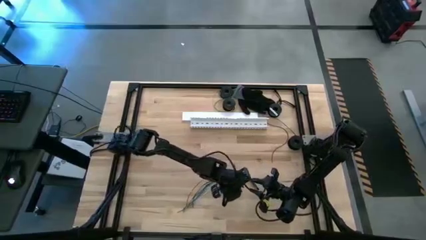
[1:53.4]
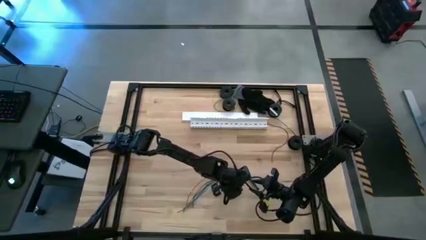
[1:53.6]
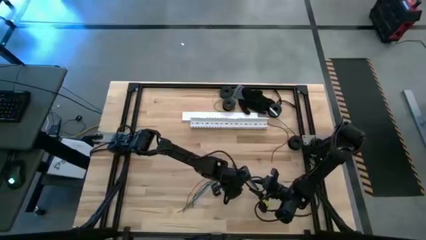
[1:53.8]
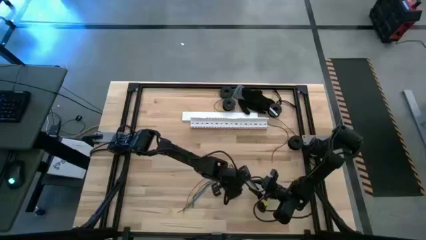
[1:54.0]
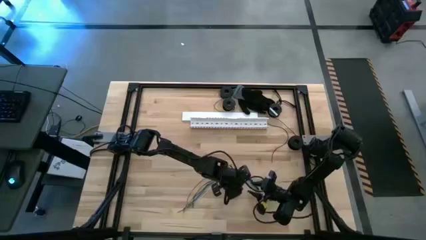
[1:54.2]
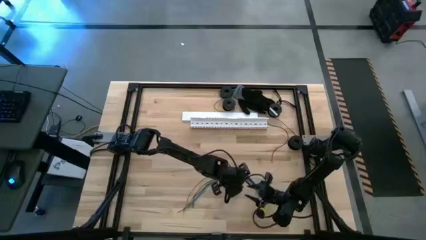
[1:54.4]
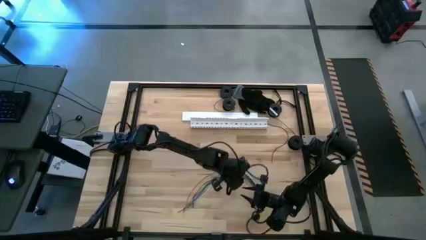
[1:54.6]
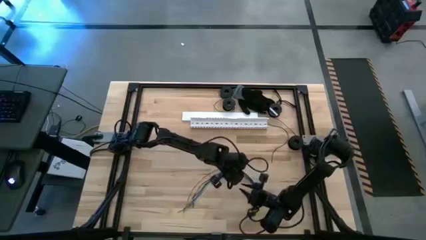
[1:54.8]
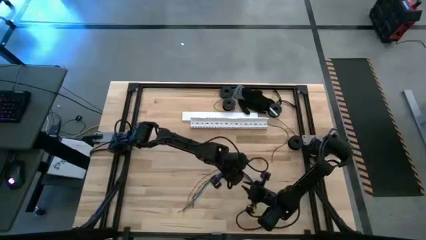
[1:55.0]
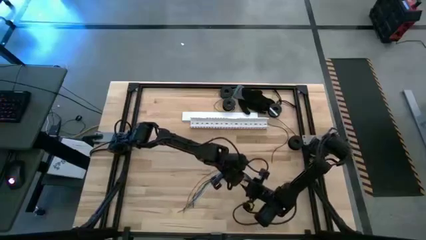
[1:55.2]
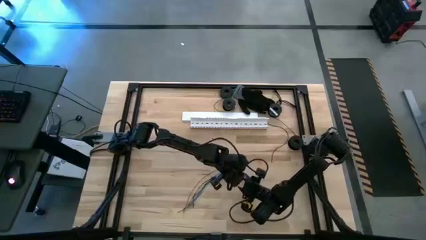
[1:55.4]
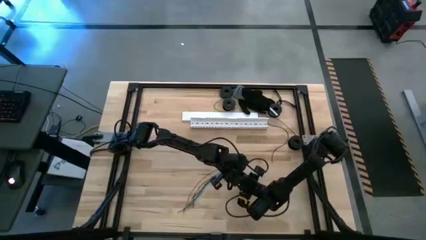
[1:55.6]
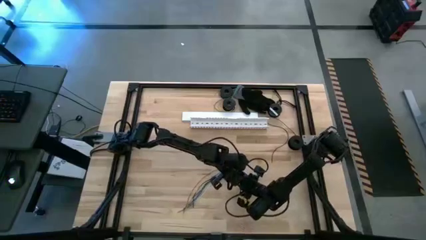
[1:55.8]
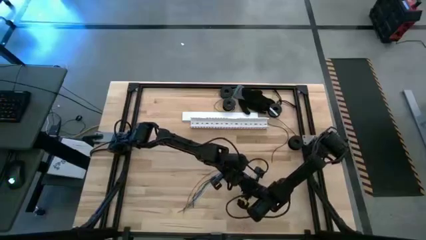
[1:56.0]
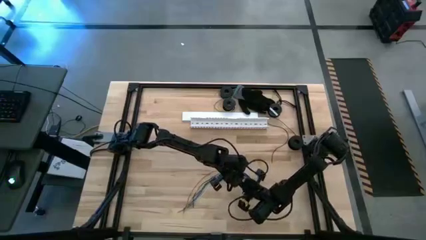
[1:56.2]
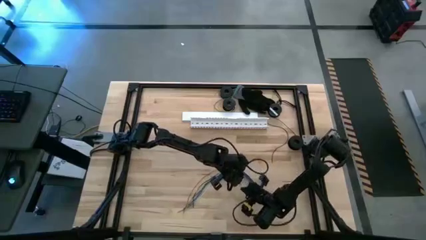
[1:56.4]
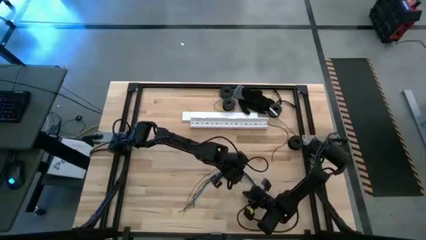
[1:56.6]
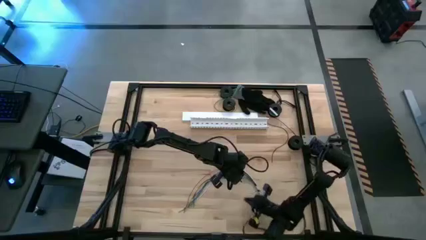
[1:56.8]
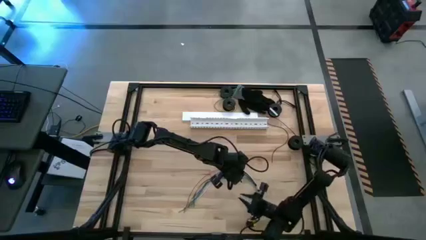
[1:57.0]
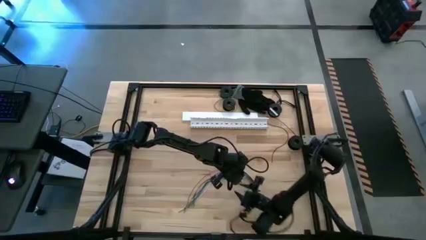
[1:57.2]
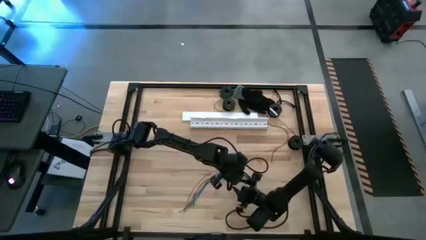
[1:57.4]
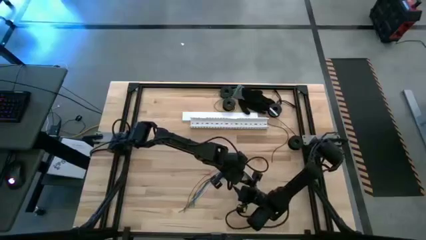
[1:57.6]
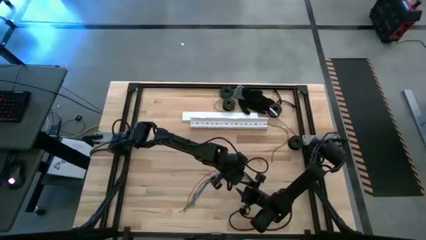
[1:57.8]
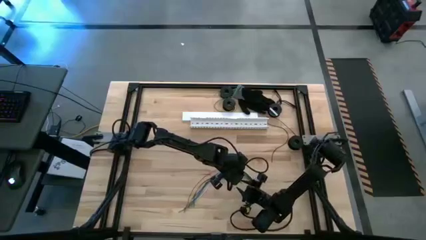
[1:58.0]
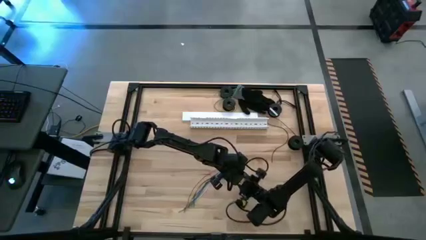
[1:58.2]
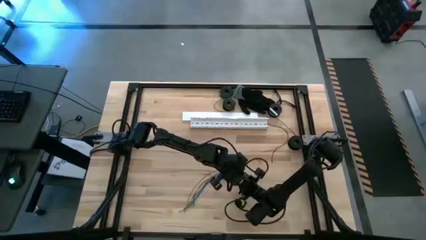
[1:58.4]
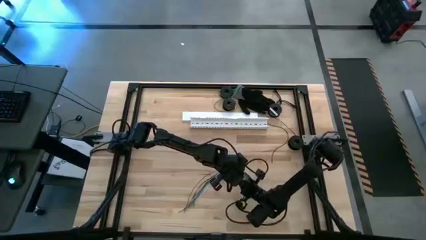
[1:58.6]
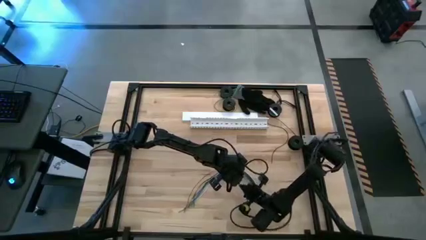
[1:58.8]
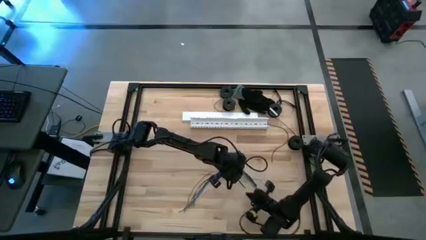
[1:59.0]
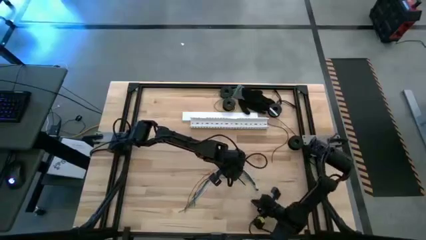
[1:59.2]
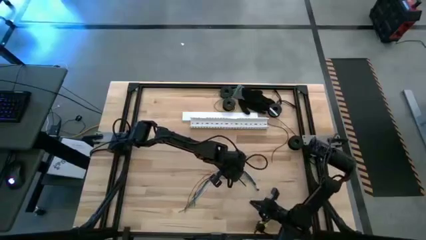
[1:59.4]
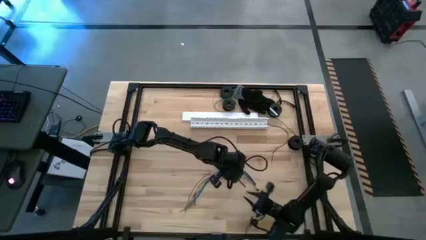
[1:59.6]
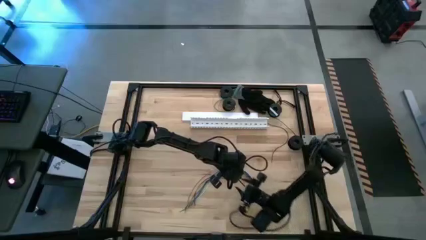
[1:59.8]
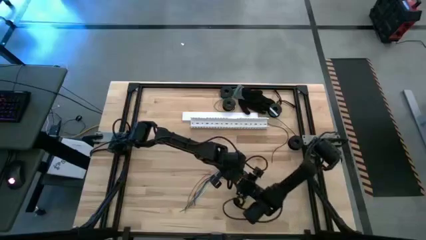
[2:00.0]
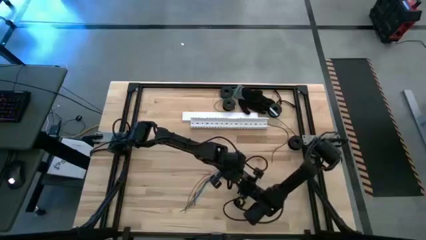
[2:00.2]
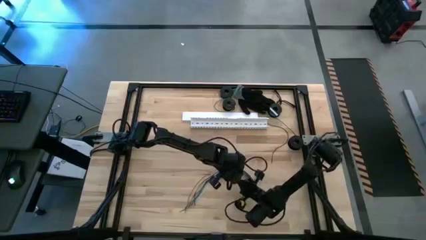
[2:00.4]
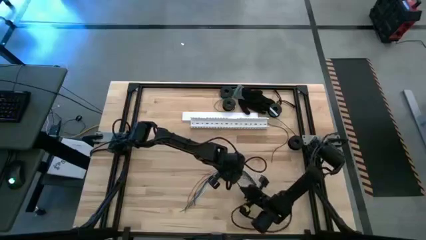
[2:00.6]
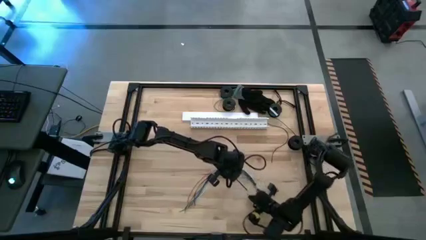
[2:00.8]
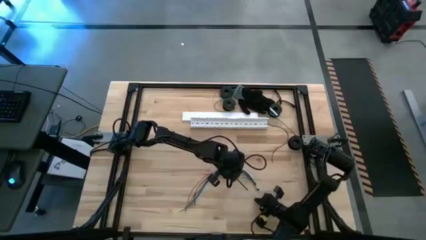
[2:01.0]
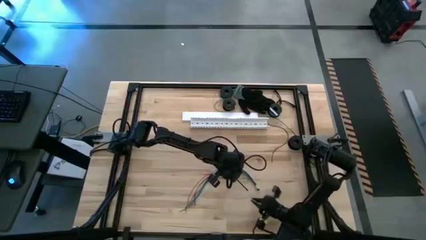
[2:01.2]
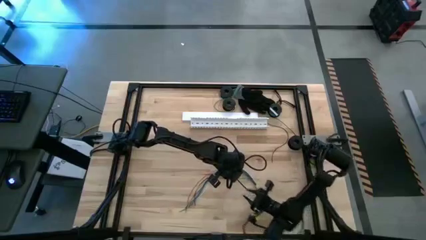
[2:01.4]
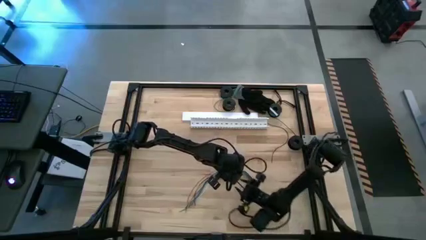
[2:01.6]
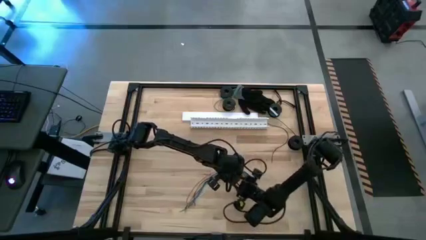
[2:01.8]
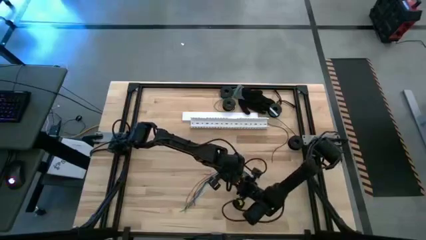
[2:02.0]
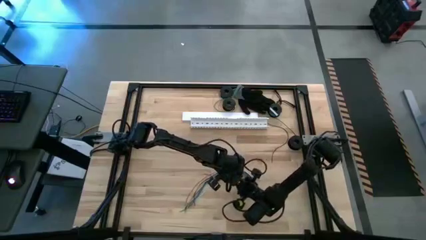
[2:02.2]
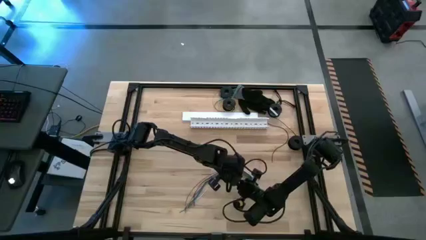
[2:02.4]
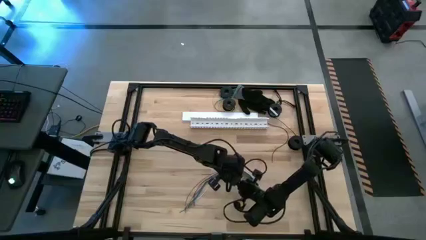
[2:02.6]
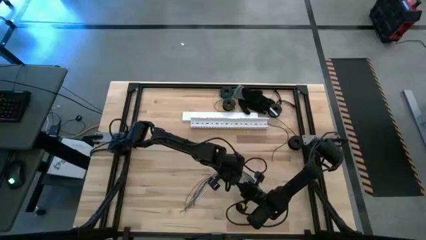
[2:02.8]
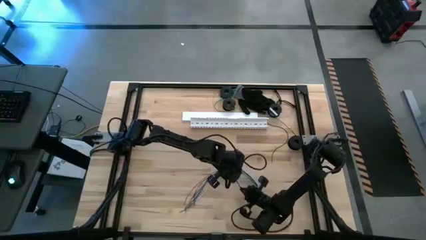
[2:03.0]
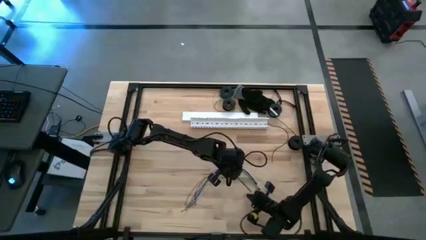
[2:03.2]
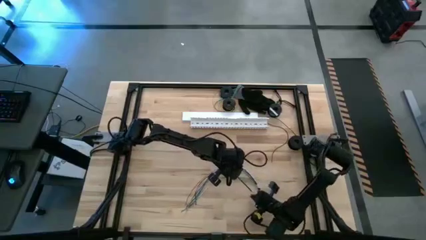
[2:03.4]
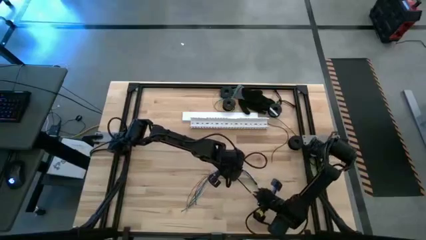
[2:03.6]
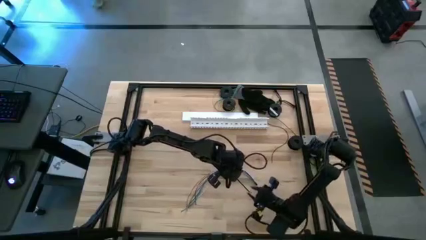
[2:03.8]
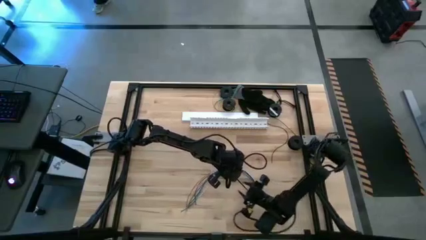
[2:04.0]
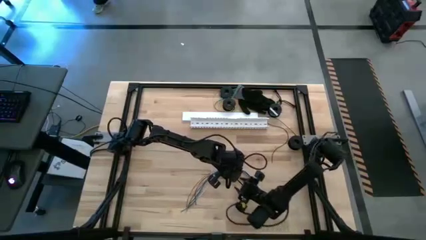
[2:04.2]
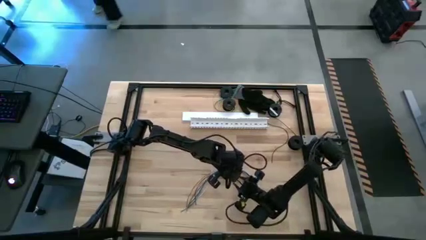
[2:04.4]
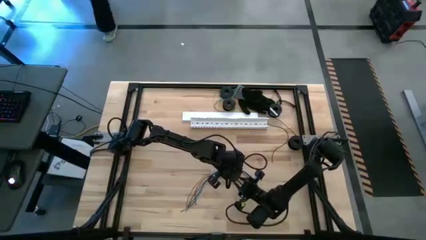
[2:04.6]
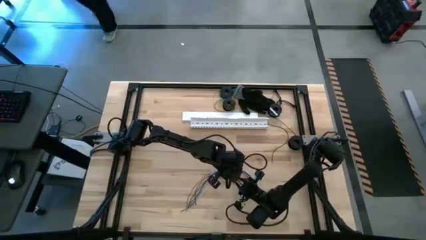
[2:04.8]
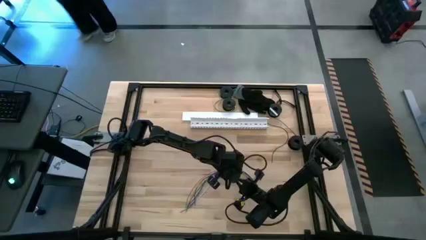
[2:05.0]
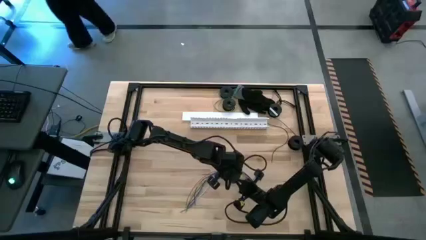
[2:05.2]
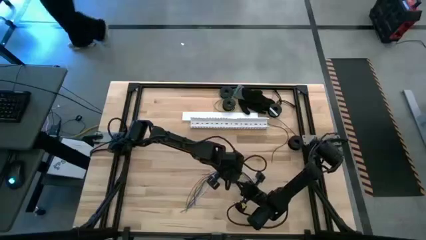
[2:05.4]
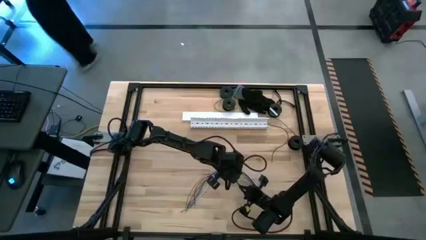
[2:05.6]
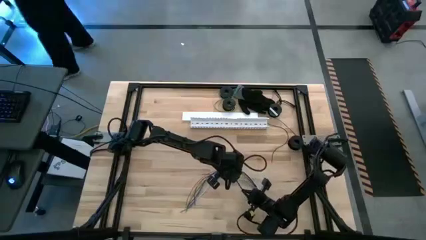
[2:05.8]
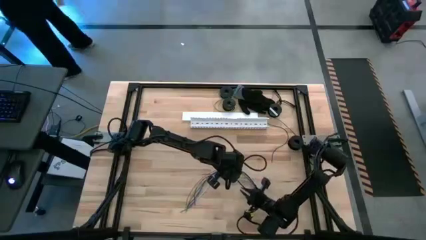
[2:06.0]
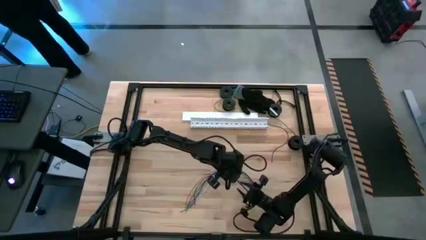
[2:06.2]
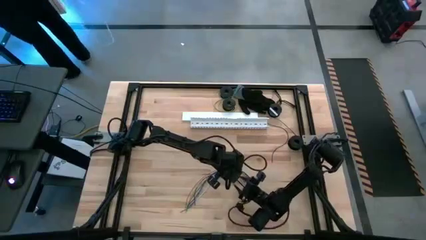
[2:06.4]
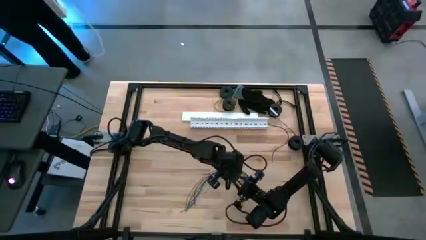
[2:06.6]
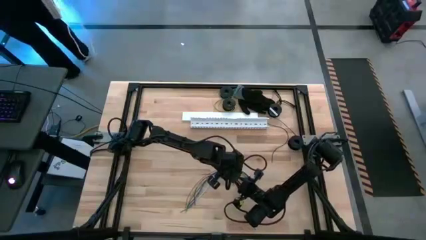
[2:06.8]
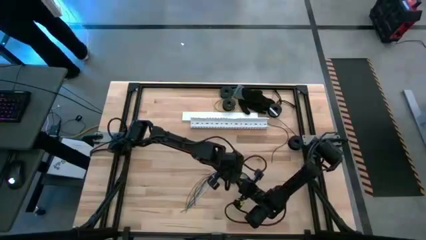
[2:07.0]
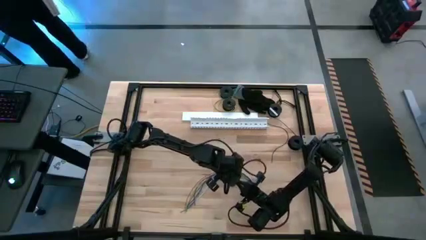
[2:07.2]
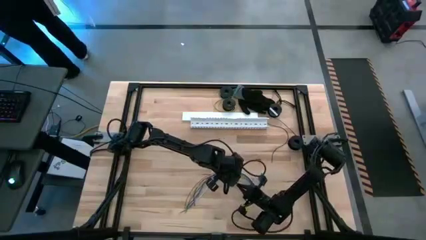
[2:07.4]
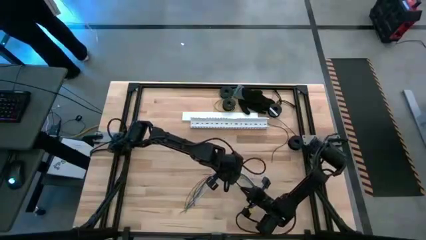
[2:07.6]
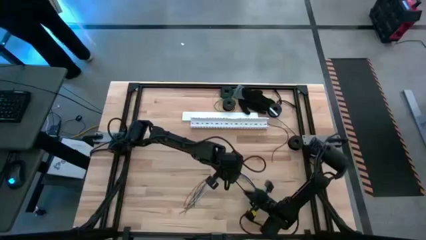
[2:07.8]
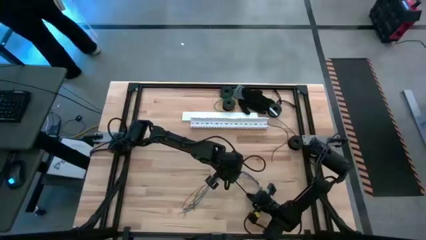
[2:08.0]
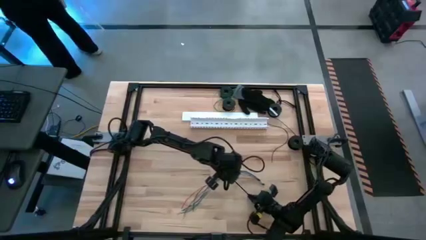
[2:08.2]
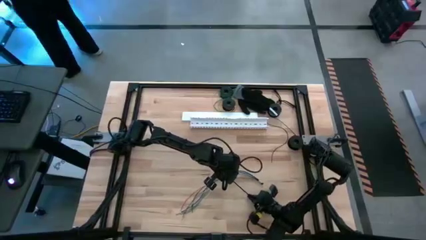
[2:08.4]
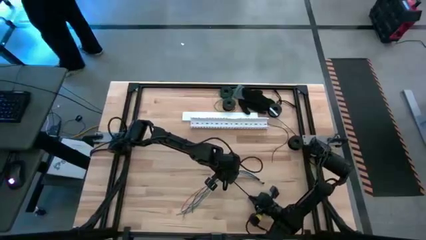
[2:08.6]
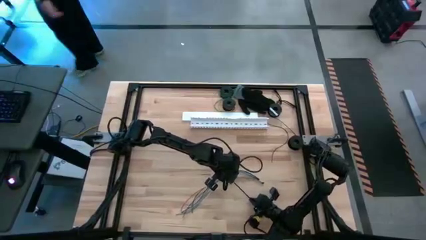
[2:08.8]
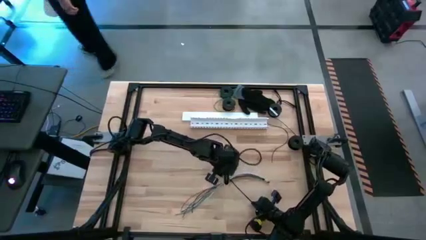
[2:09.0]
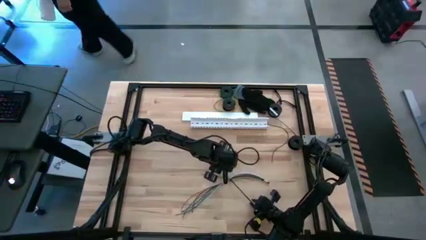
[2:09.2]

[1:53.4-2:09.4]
Task: Ziptie cables
Wrap the cables together using a black zip tie

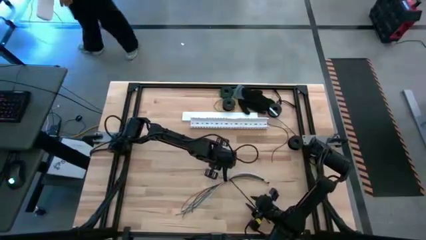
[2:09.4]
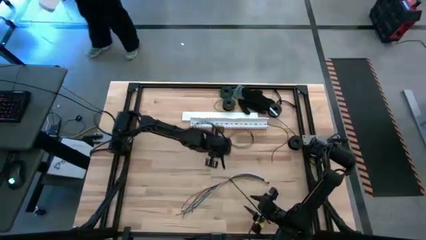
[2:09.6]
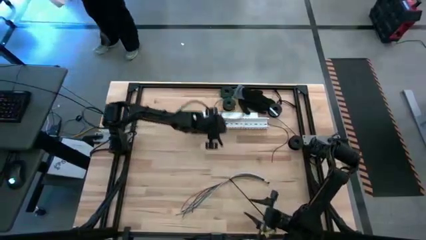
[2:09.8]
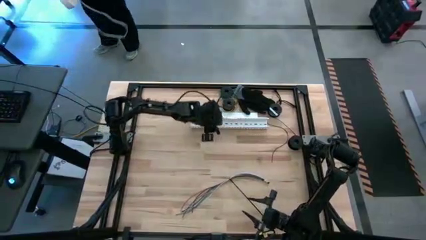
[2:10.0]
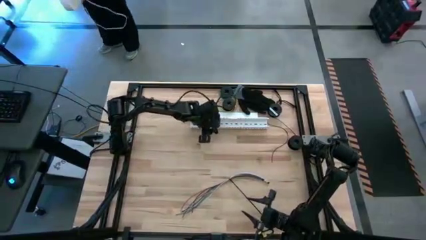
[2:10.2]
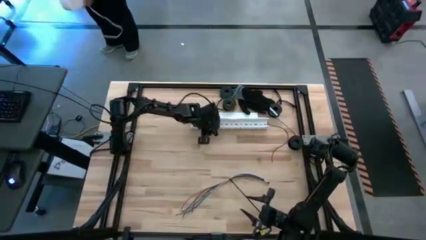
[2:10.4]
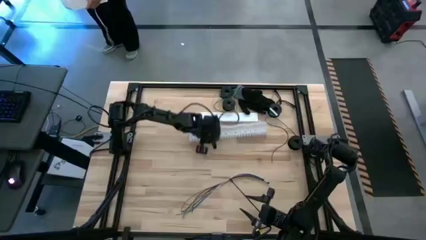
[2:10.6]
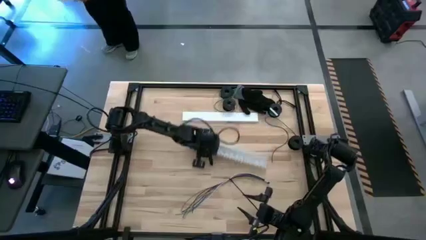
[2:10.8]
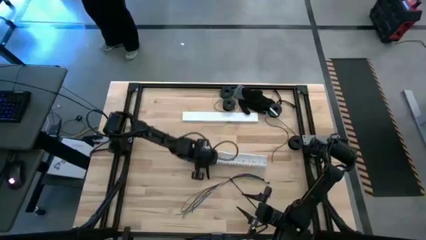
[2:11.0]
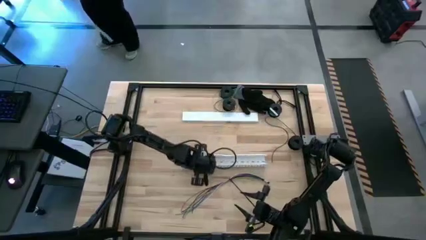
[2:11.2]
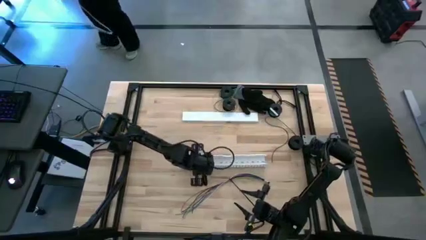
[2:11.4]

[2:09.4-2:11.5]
Move the white cable duct to the center of the table
